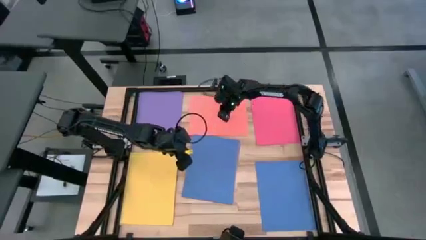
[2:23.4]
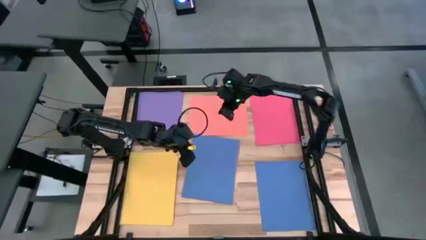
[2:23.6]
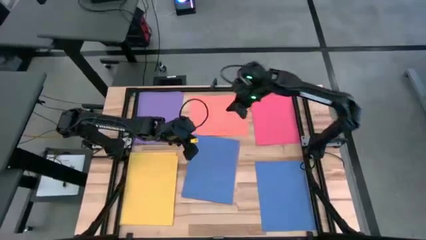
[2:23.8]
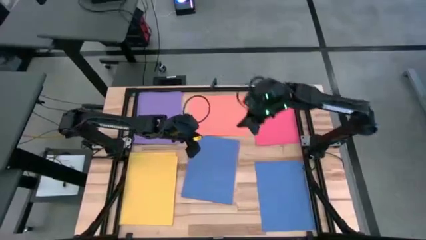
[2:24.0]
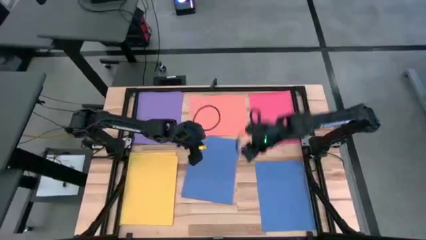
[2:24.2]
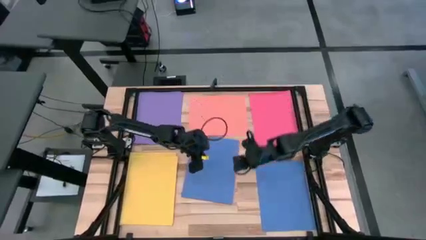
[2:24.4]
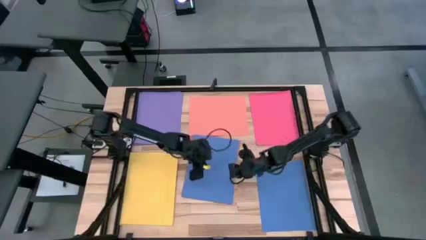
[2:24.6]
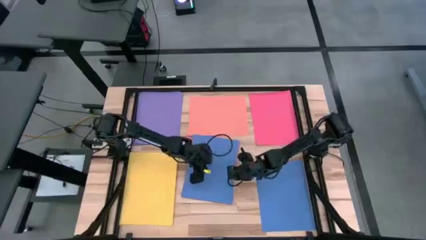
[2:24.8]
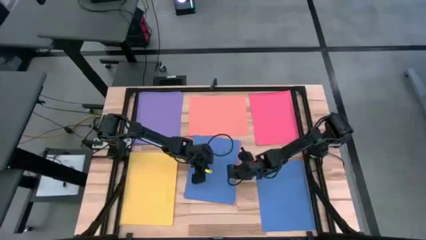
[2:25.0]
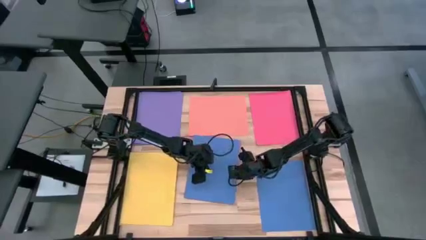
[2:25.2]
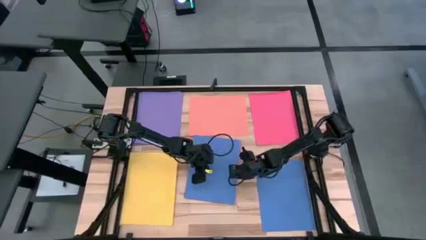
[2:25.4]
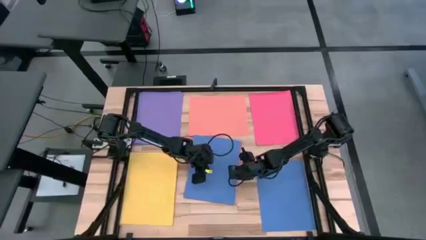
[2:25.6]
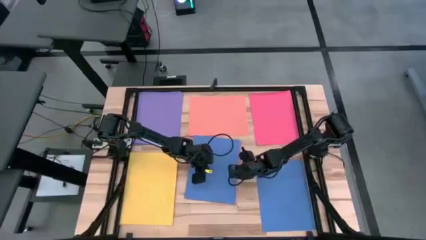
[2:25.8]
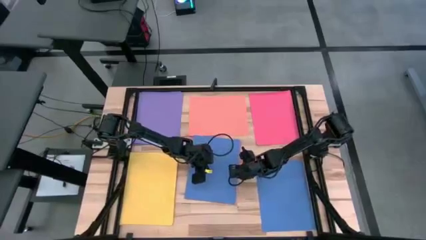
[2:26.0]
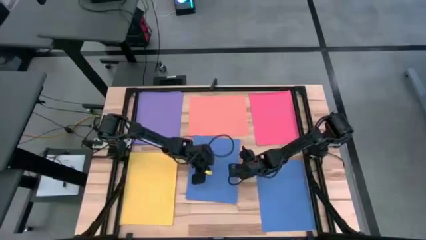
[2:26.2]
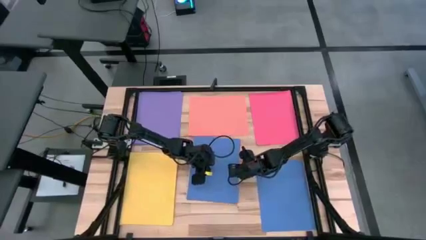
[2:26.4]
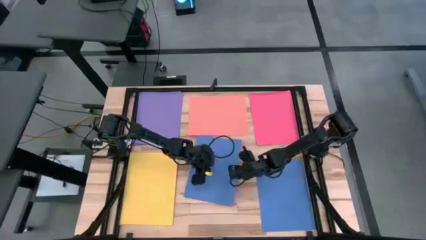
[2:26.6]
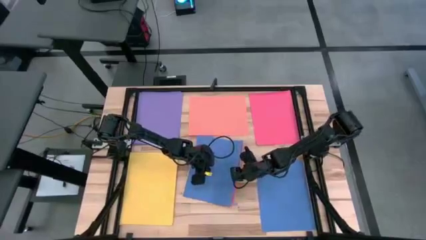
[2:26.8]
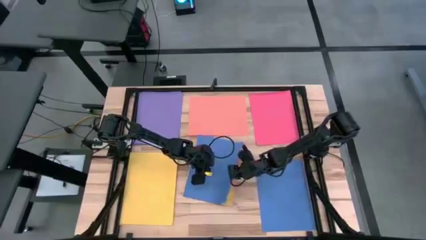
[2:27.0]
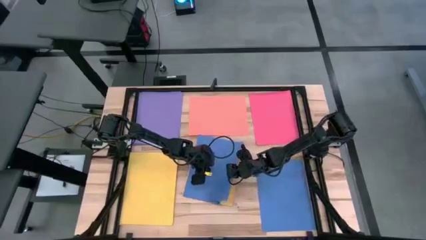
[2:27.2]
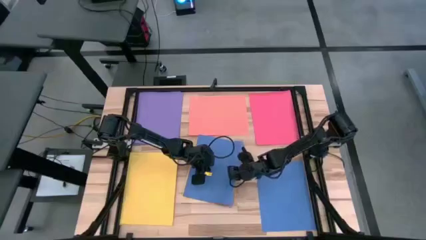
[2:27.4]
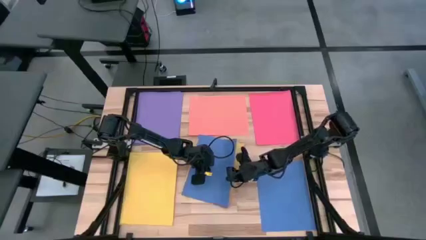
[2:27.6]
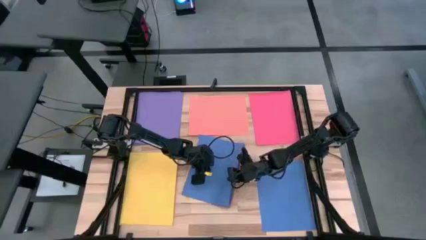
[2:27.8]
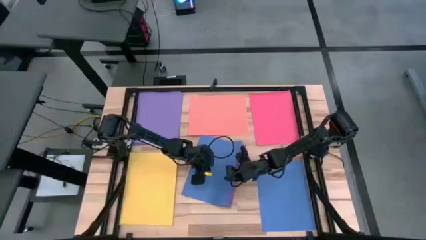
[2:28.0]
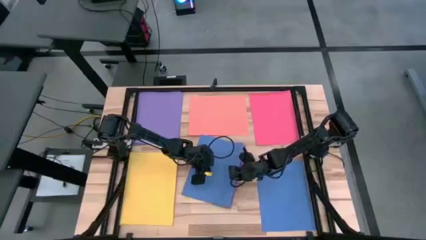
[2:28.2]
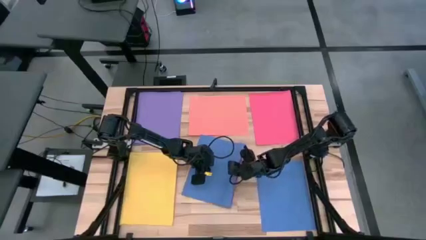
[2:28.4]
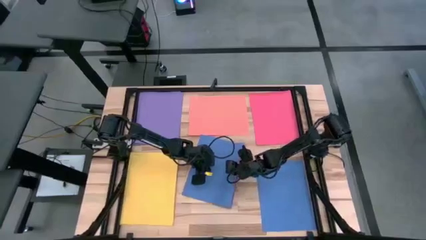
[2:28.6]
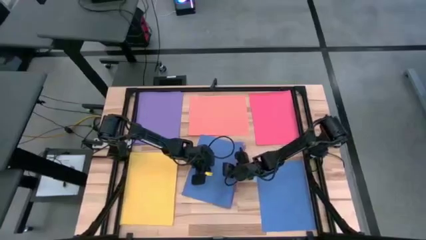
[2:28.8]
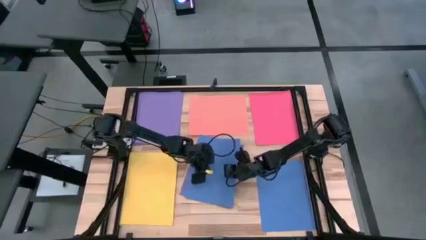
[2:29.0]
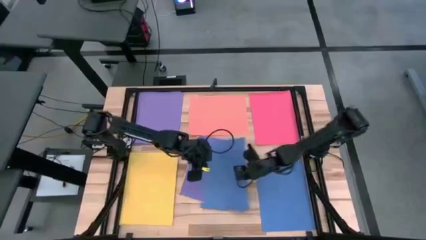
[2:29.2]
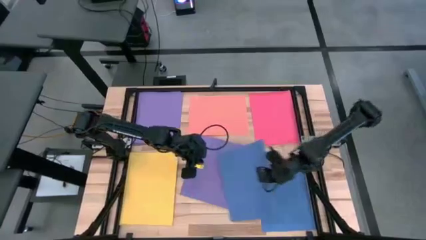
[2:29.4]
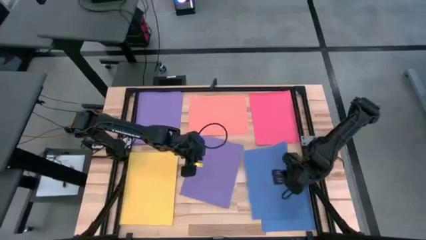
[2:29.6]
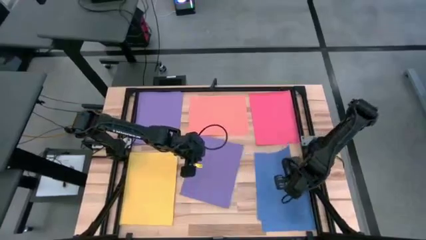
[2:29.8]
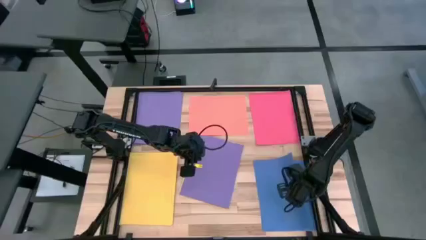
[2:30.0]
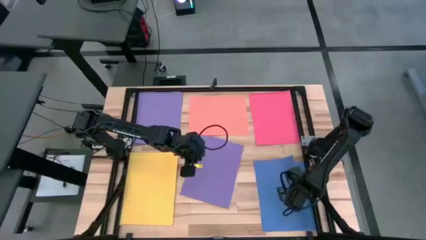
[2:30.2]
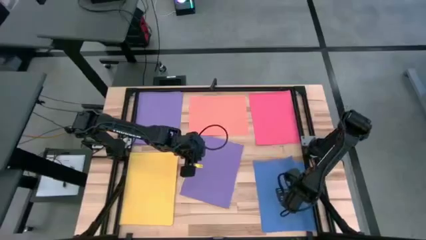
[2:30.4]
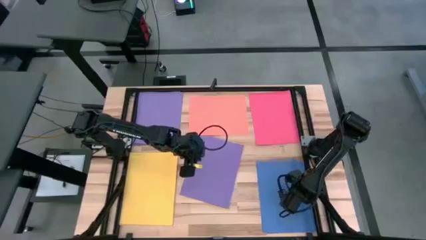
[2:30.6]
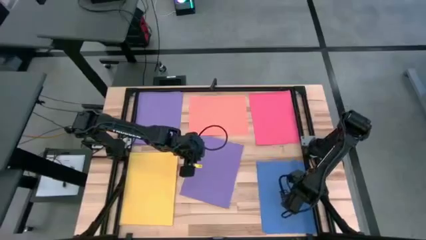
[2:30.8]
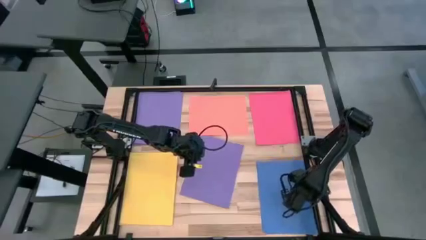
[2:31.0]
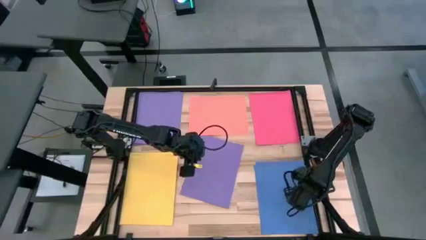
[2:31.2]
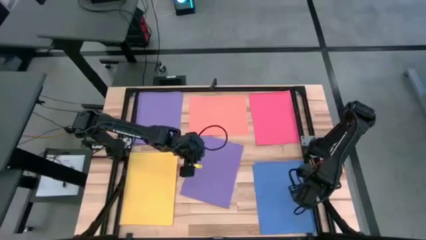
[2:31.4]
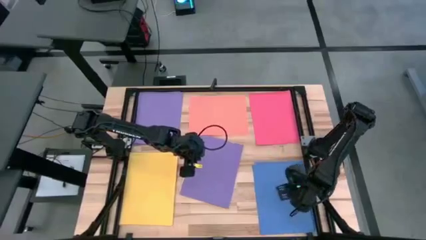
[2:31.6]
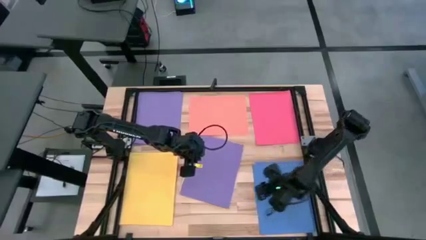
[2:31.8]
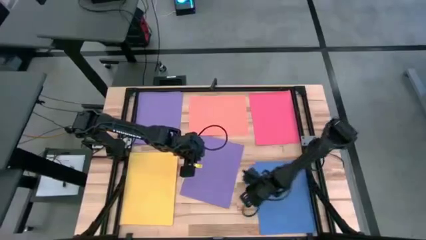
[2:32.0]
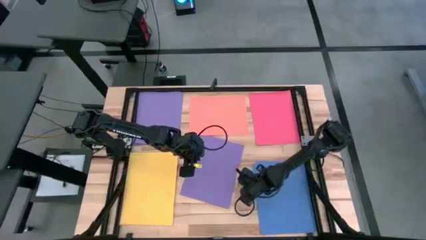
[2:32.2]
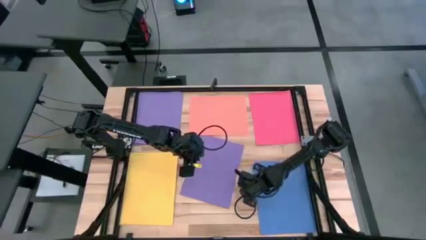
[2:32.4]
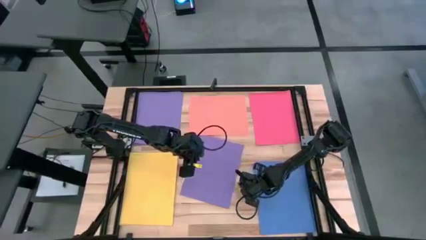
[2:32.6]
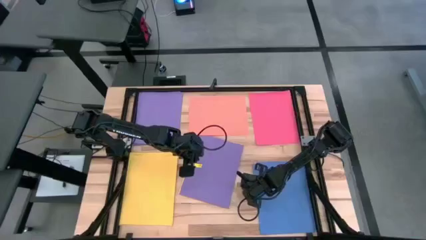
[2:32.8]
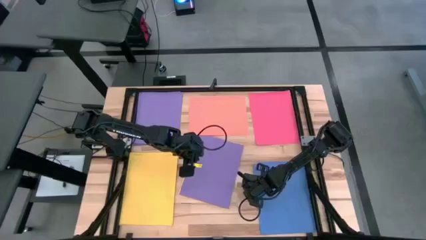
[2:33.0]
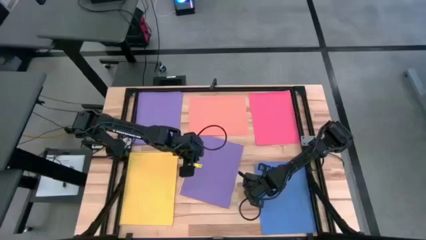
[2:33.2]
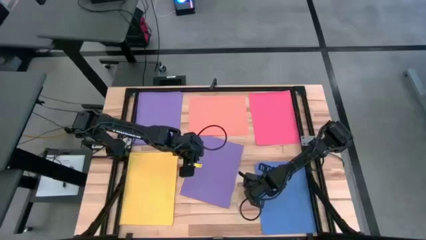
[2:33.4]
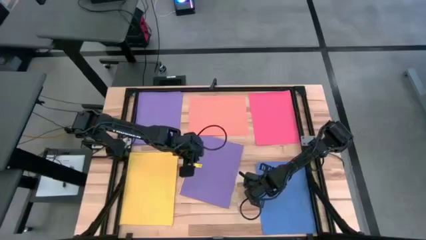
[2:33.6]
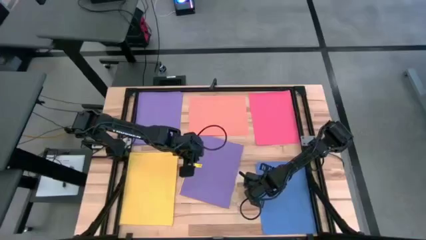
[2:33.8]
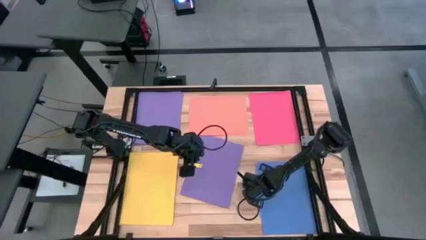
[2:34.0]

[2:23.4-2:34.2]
Task: Organize paper
Stack the blue paper on top of the other blue paper

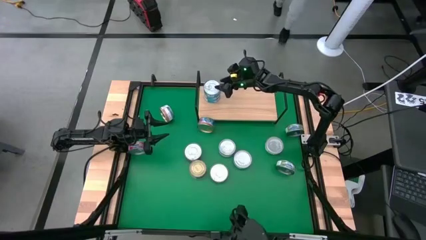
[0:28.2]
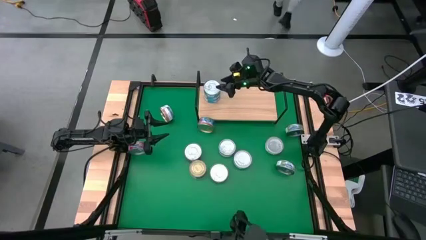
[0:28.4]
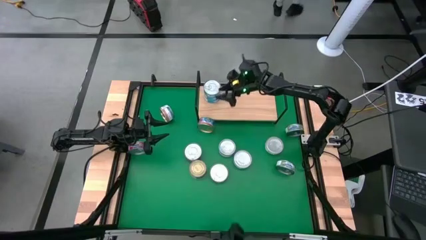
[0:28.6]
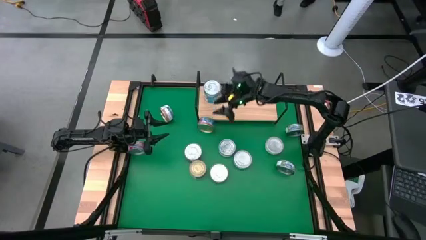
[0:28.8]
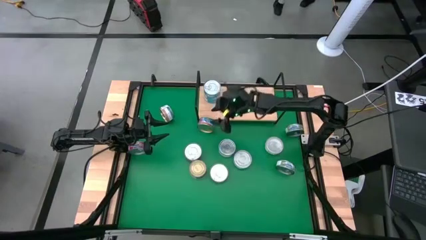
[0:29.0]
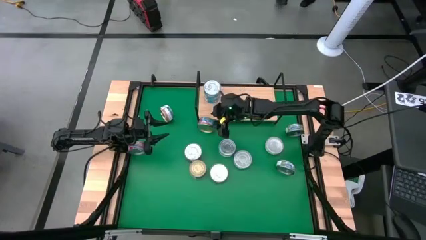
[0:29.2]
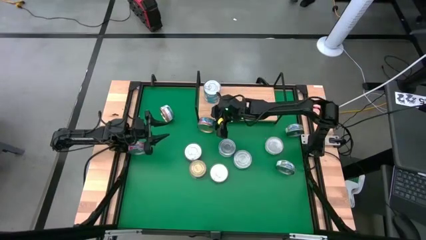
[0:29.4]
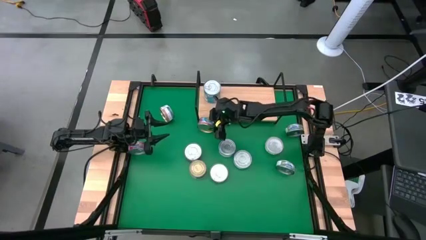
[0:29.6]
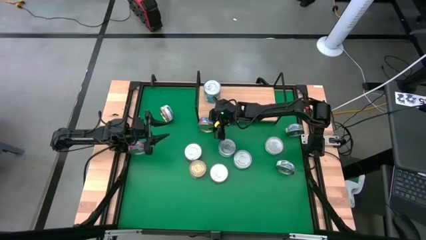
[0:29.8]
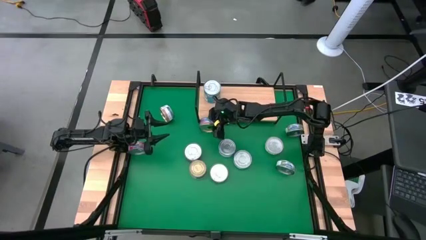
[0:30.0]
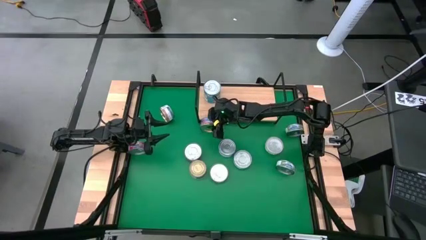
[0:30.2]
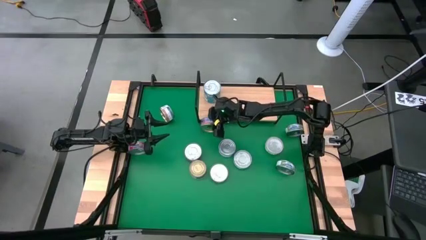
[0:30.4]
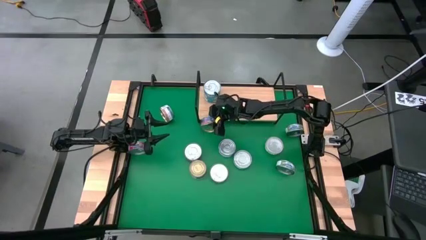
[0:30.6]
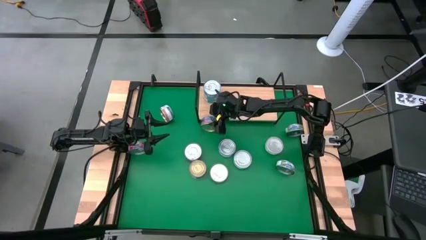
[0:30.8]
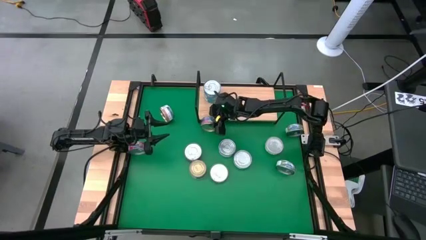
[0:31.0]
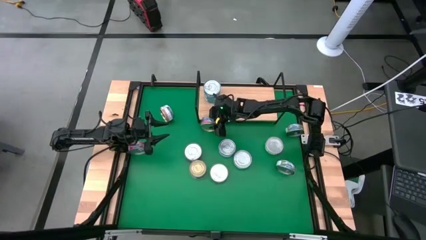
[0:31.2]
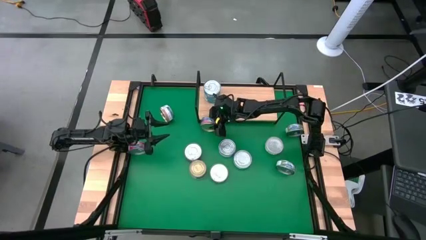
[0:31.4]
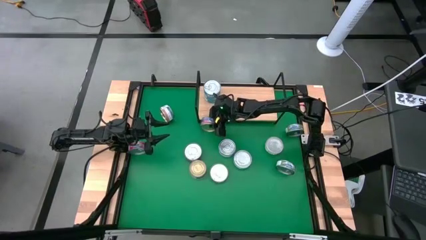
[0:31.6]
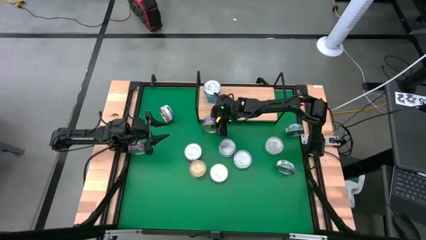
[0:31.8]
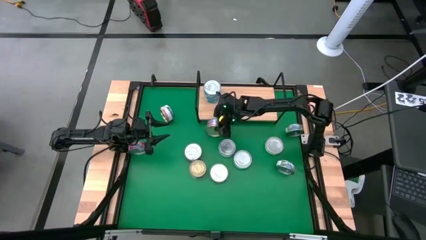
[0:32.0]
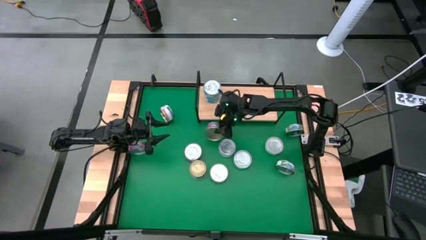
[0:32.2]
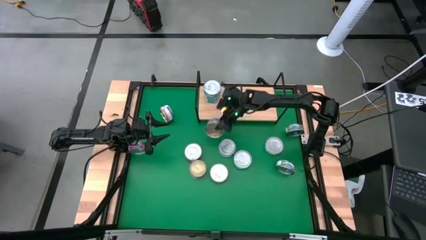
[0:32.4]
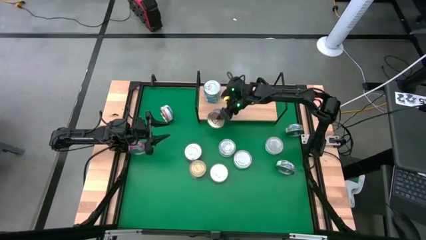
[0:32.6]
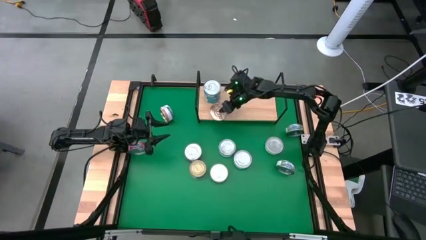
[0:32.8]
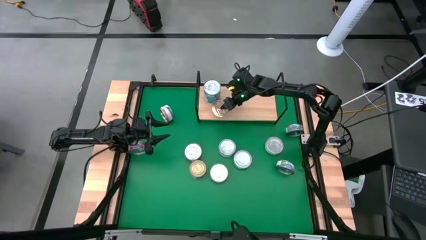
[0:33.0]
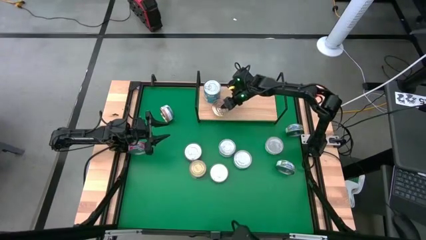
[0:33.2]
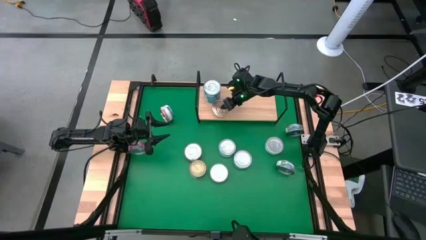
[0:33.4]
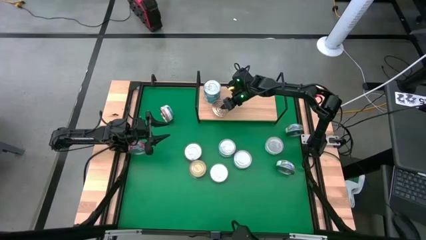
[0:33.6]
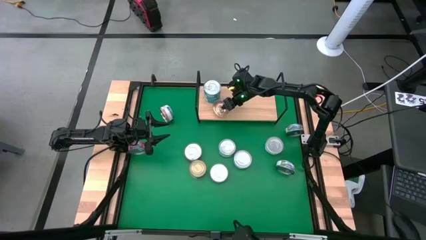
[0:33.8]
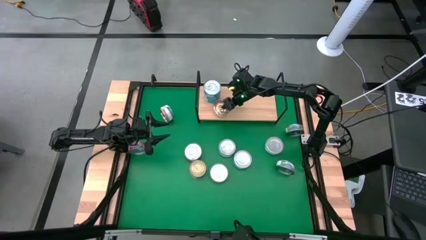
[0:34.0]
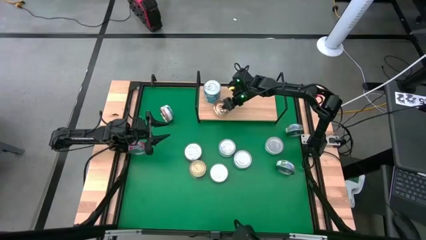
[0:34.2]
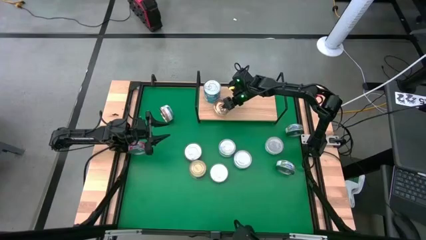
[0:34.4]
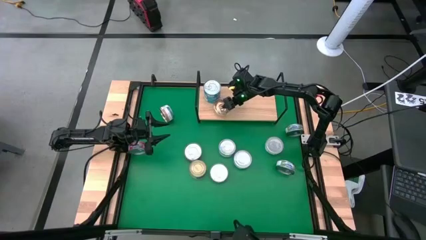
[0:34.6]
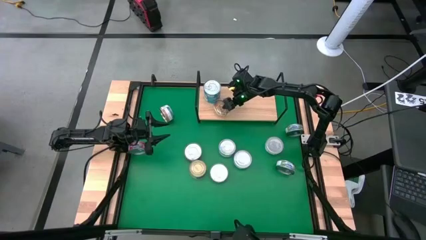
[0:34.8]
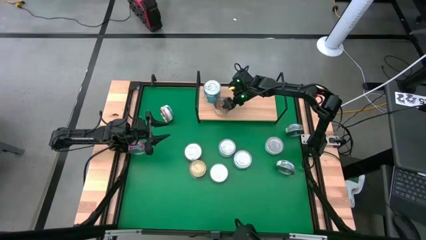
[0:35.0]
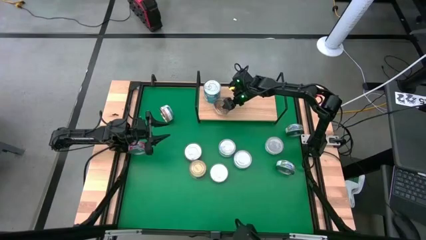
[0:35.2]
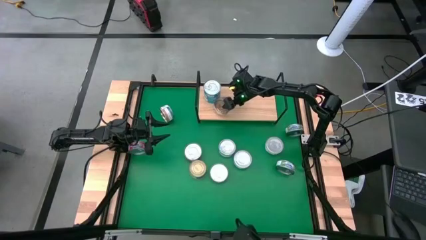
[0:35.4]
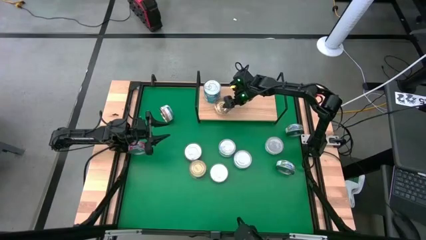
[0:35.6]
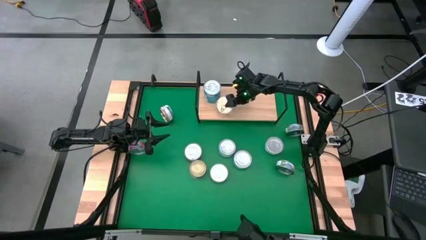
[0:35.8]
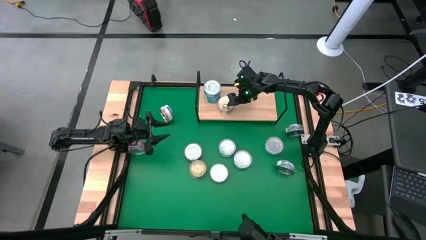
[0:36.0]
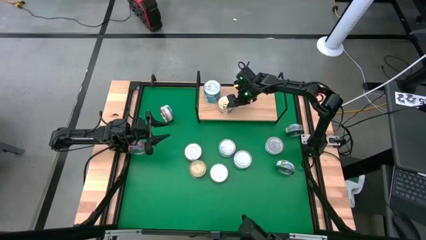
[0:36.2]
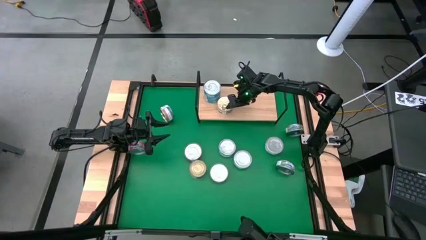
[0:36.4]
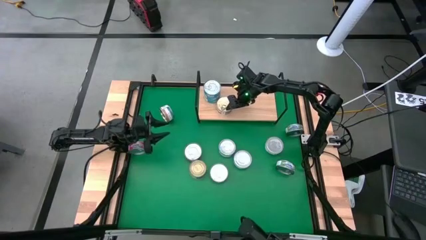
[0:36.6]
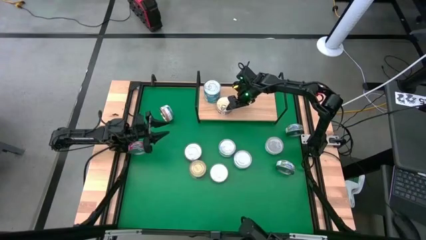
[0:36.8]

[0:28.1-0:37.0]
Task: Stack canned seafood by type on shelf
Put the blue pink tuna can on the shelf
